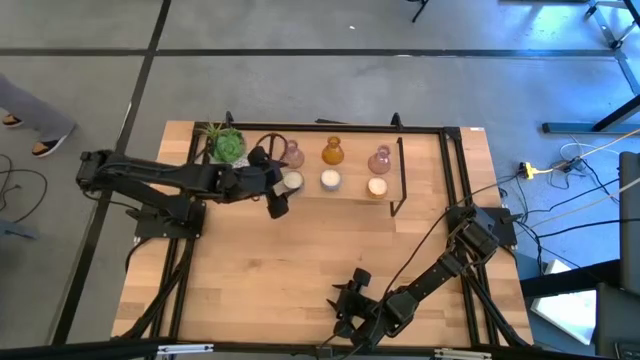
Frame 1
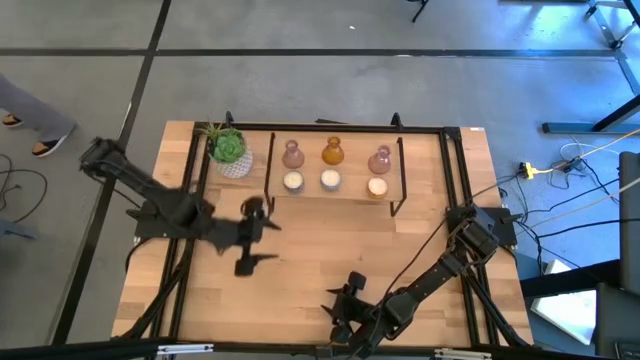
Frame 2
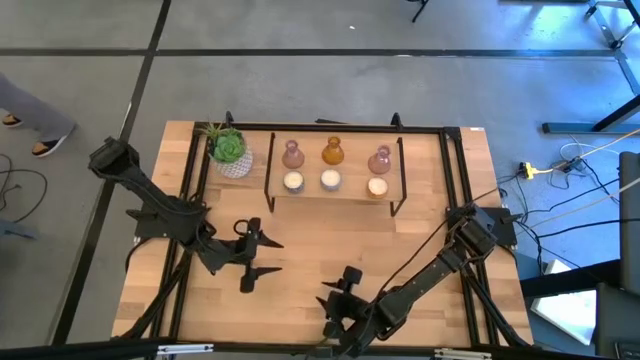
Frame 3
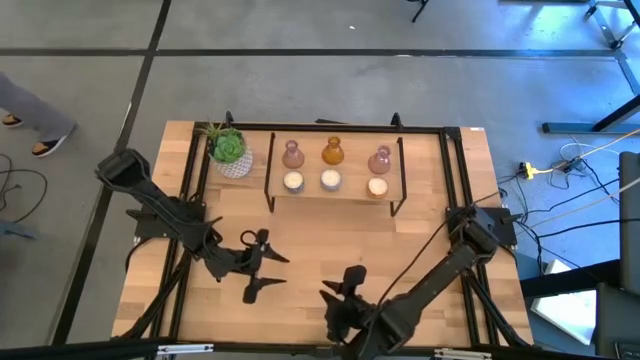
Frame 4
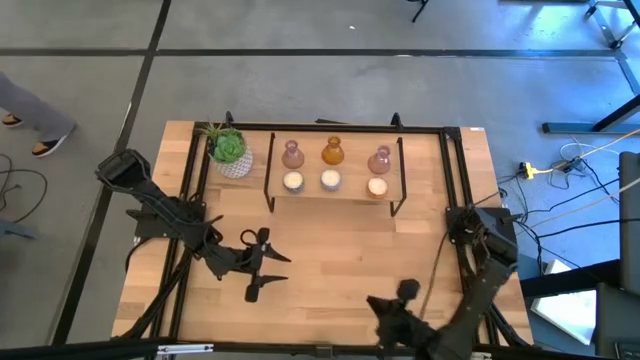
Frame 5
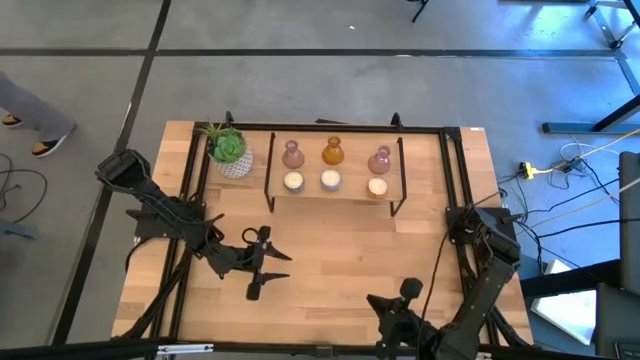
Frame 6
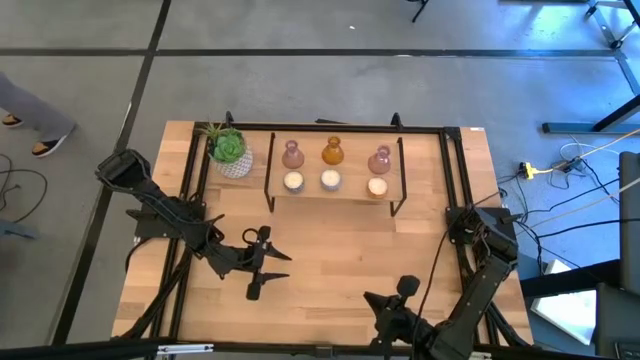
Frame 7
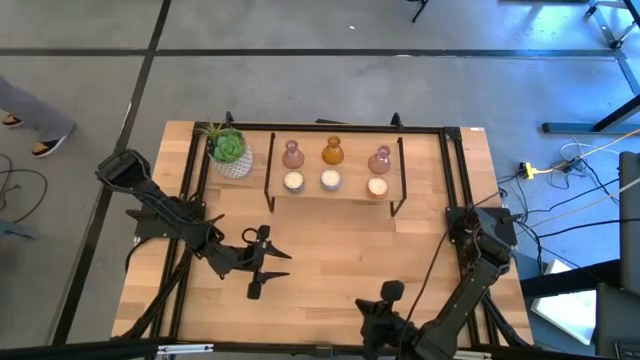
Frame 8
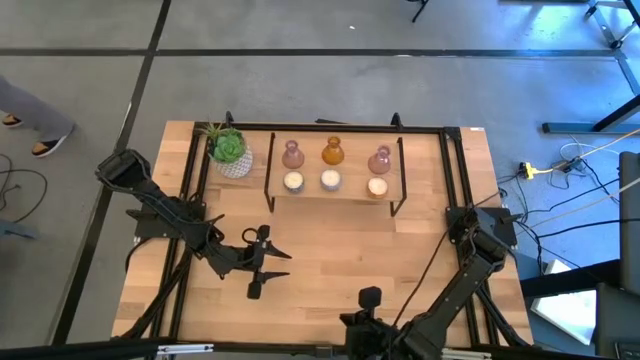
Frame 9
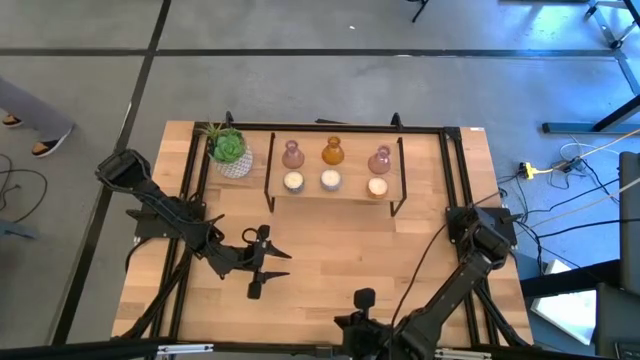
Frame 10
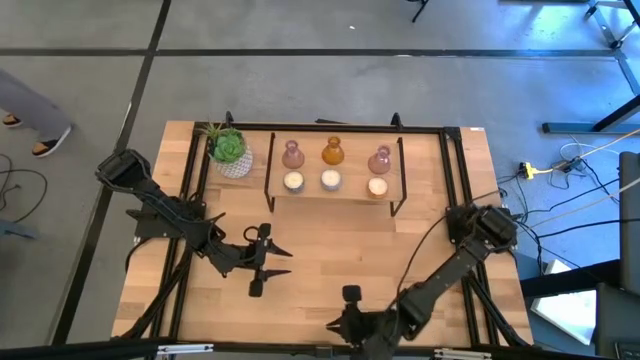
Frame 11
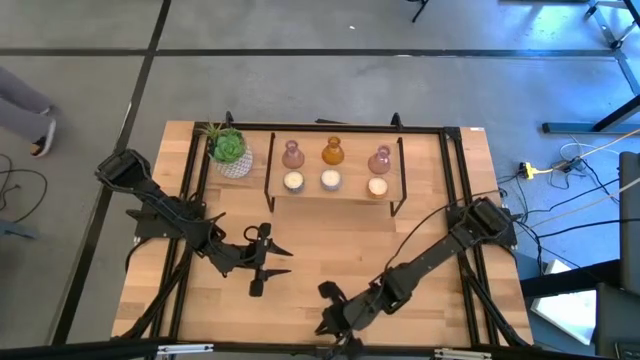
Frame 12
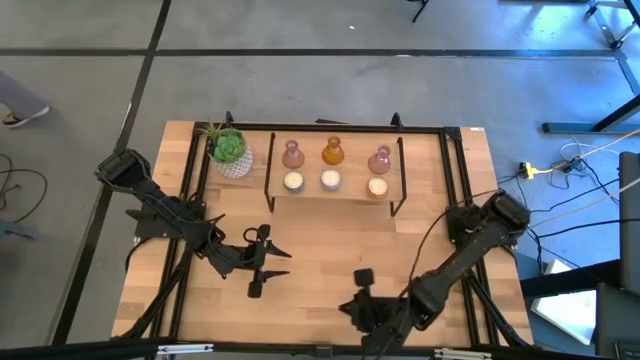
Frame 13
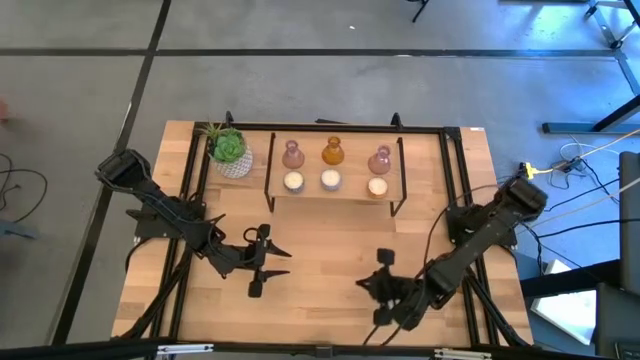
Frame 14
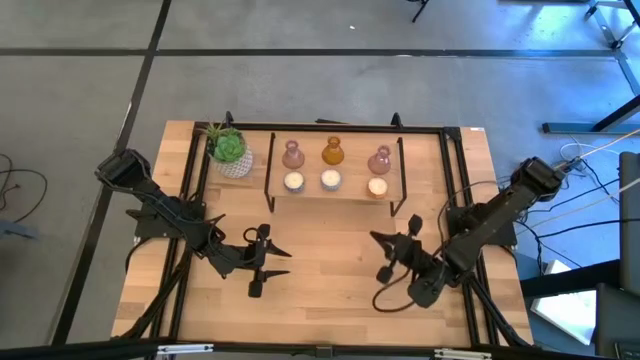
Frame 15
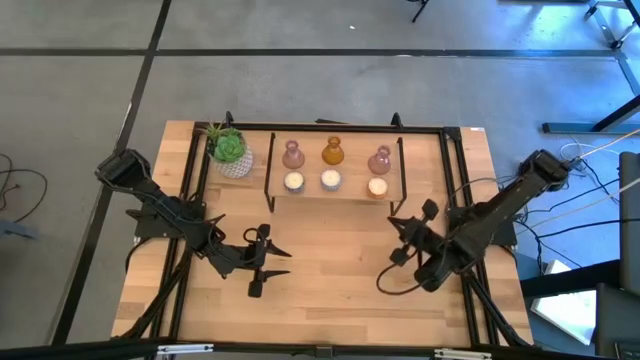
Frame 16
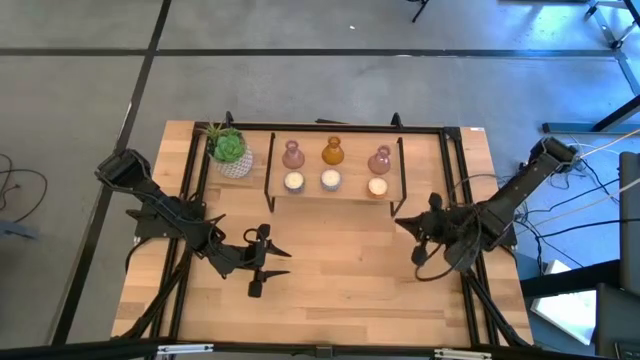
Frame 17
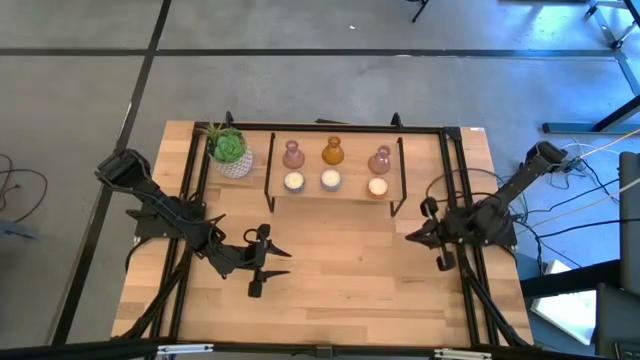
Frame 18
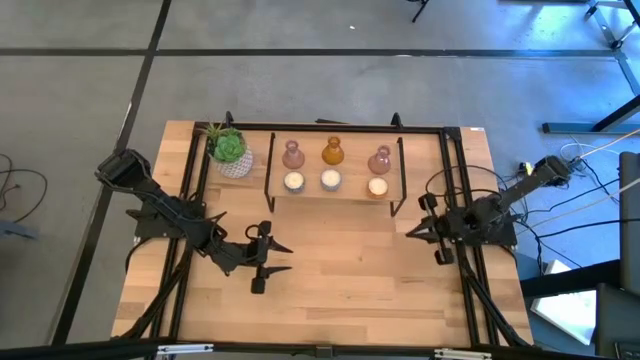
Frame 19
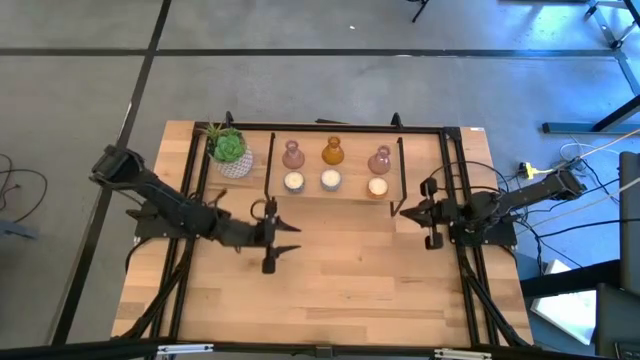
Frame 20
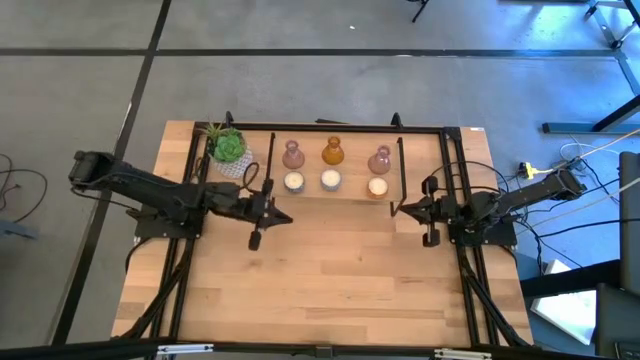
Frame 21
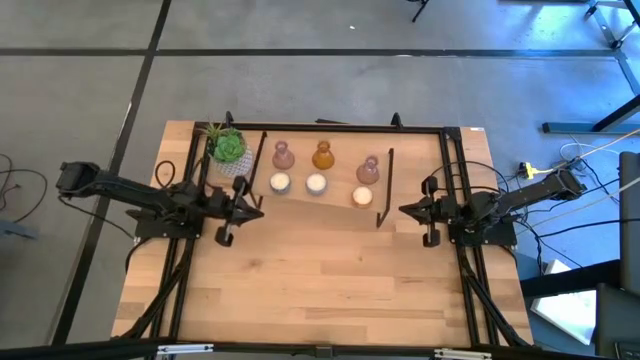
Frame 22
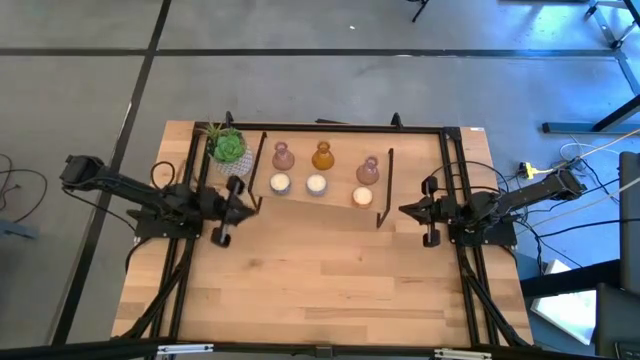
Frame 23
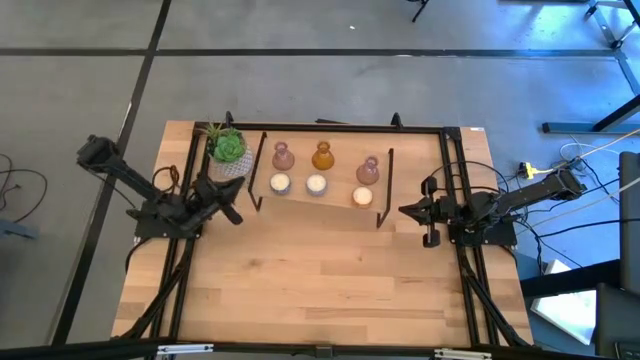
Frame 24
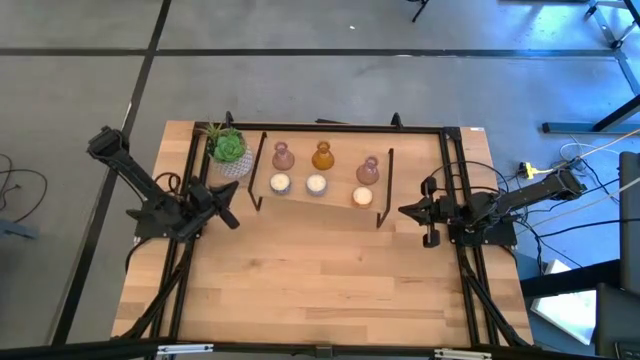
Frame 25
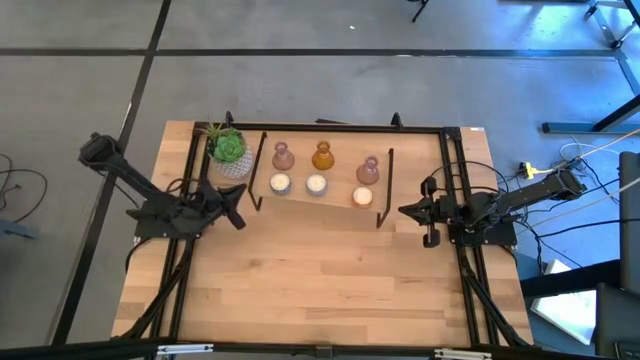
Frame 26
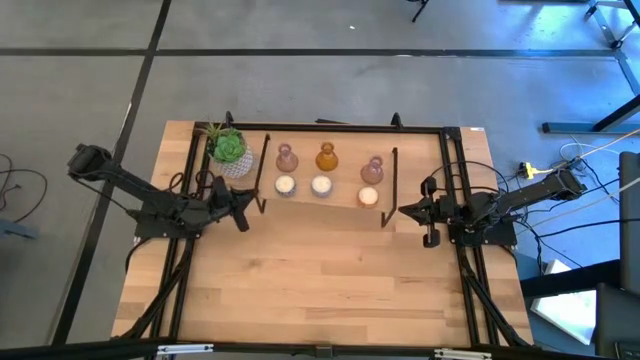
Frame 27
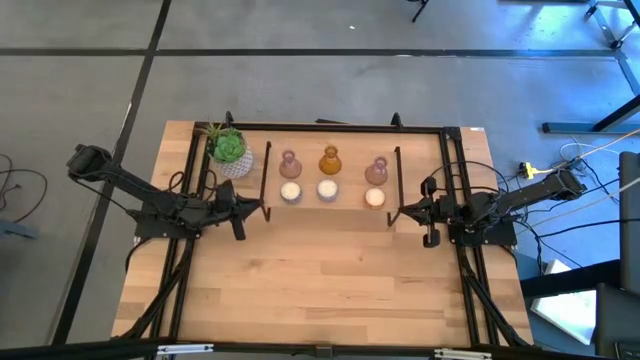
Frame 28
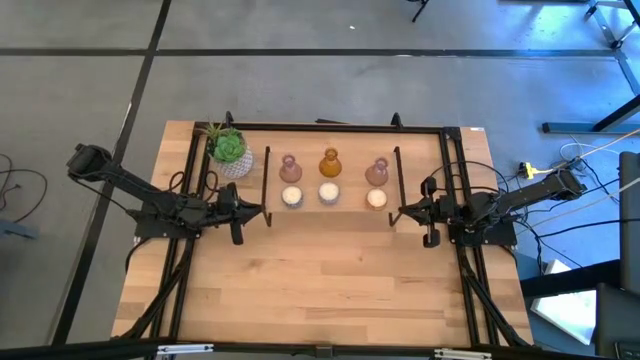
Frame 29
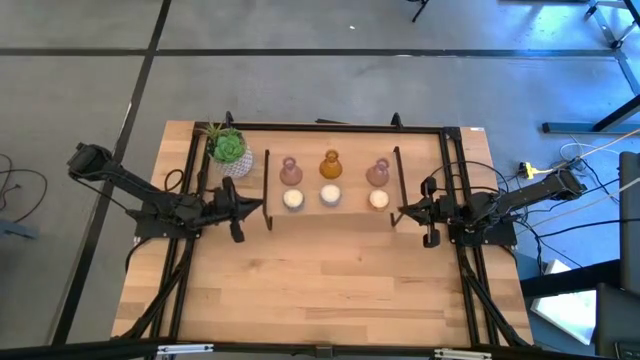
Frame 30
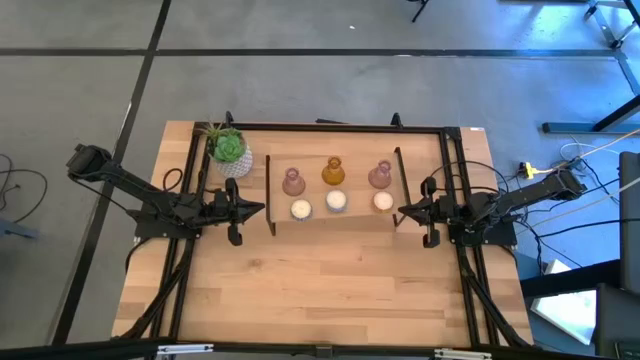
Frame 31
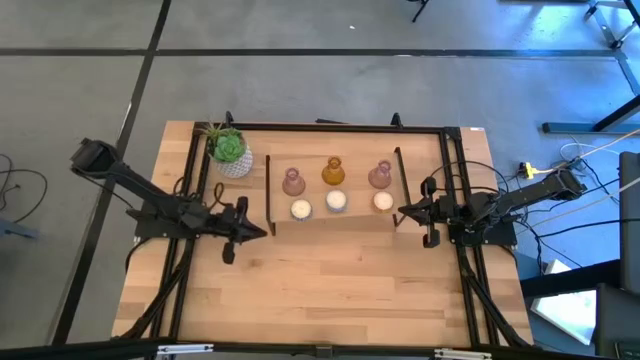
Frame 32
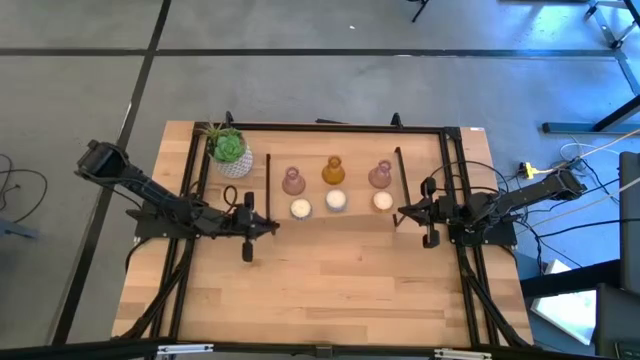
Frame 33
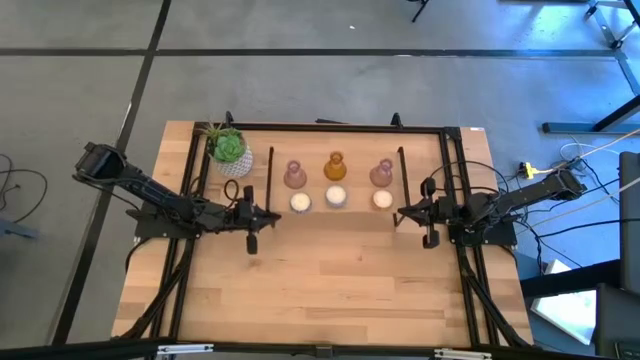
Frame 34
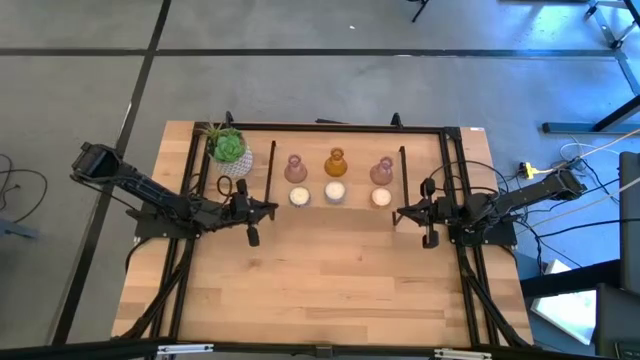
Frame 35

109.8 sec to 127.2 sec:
Task: Pick & Place candle stick holders
Adjust the shelf

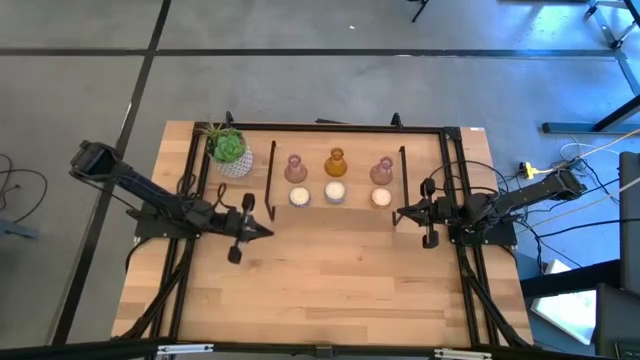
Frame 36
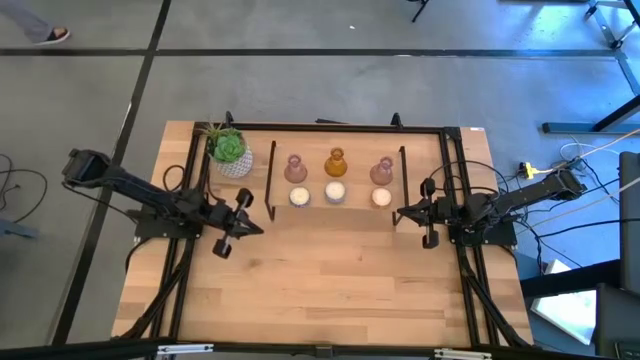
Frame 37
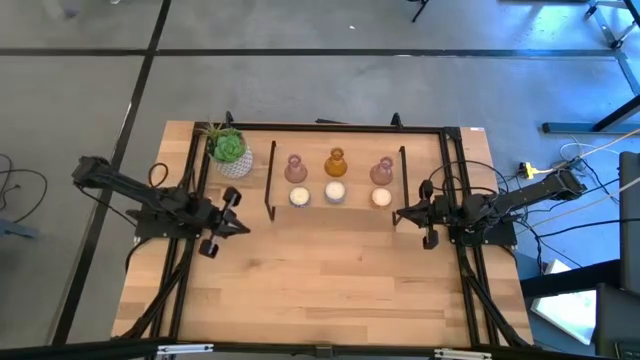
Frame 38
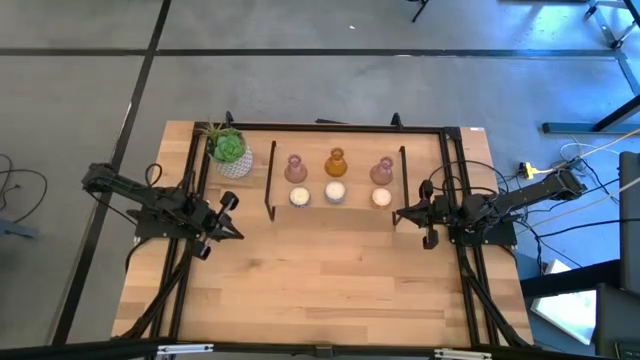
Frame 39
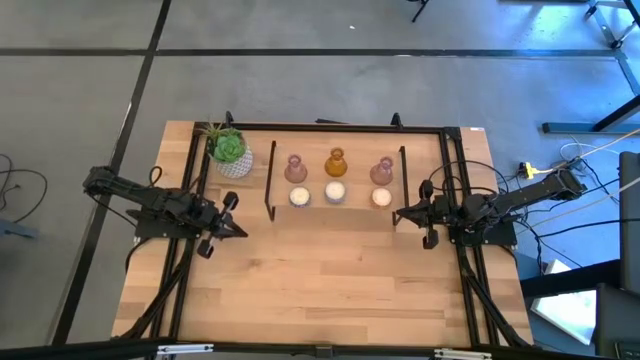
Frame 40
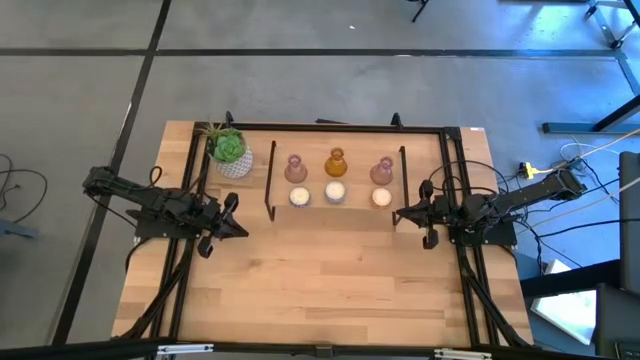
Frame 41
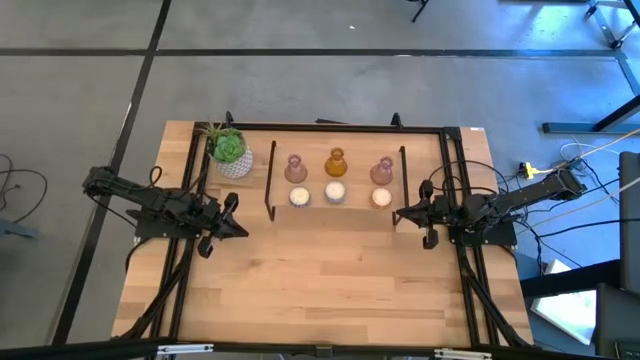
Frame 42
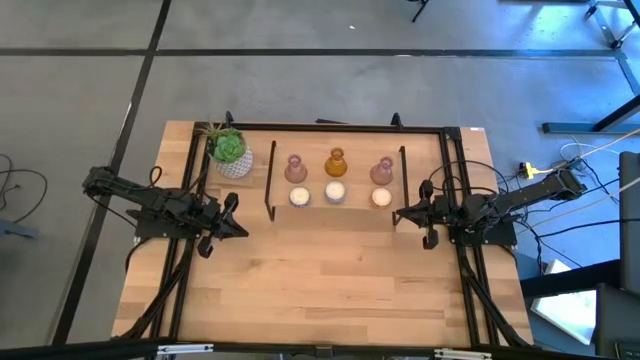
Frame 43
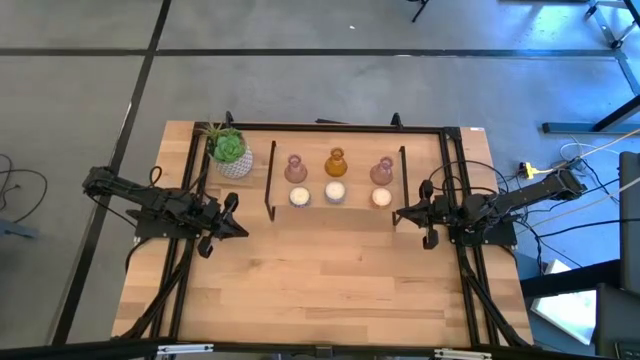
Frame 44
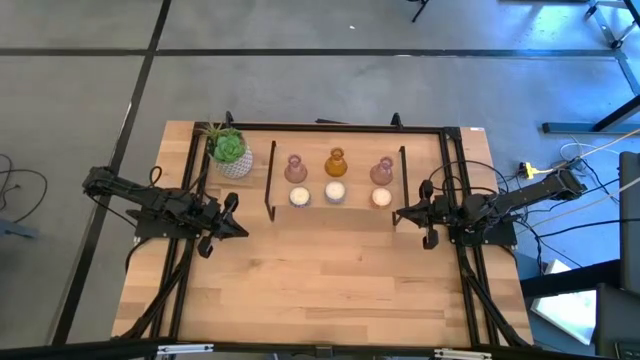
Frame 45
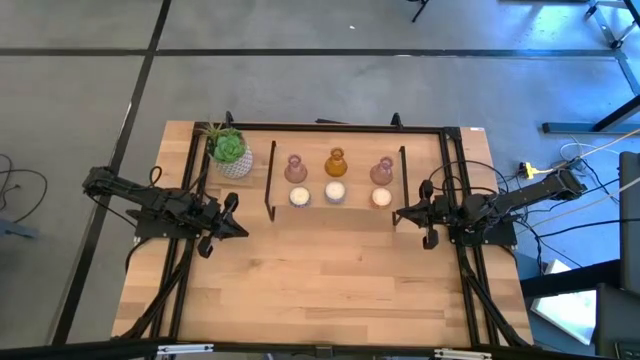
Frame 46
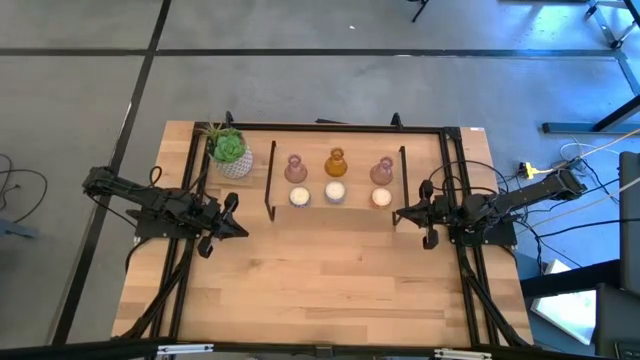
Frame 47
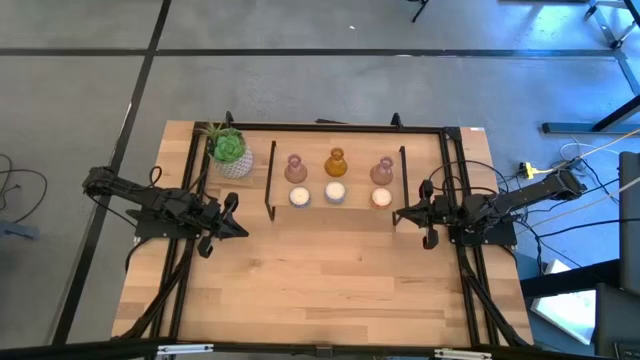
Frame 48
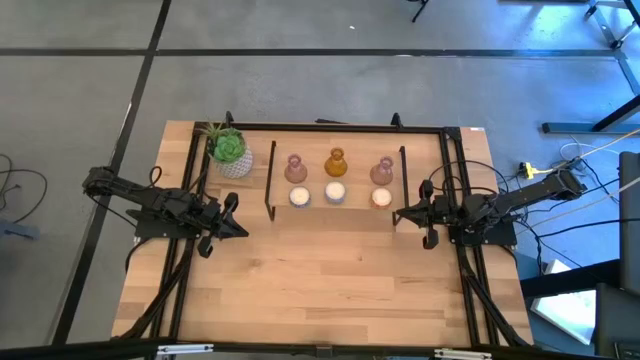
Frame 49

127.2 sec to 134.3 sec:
Return to Home Position
